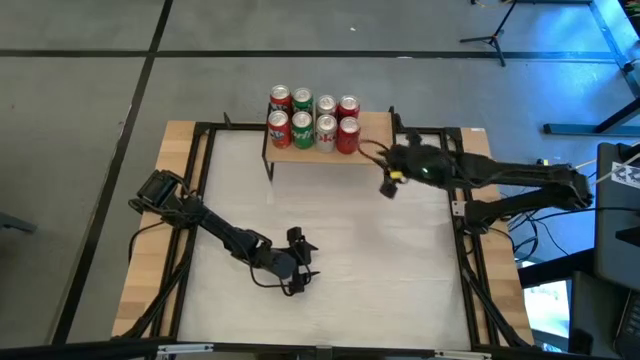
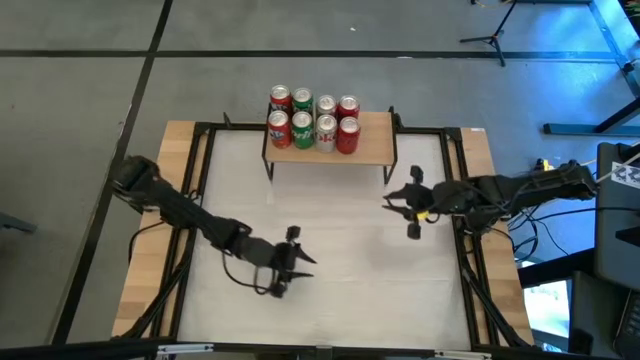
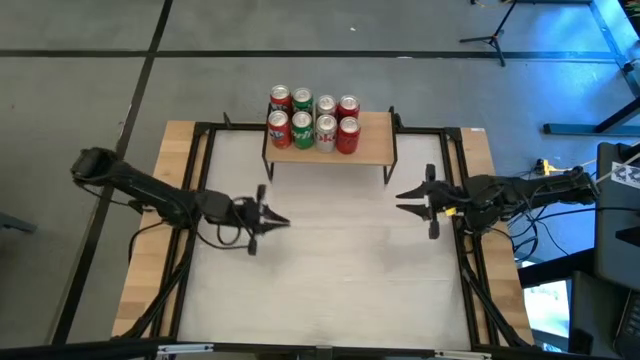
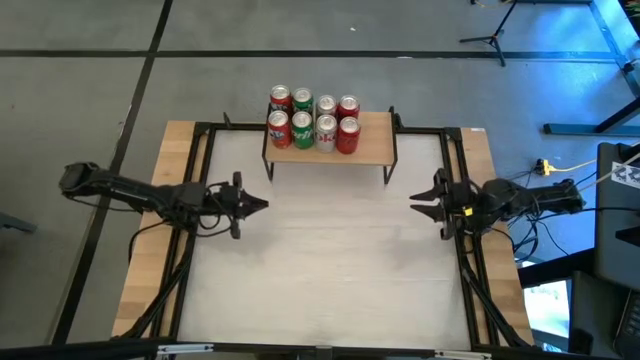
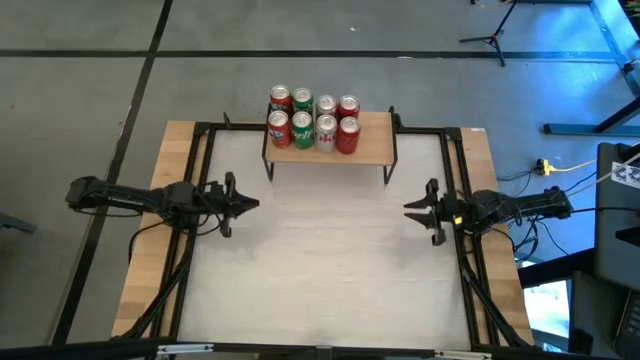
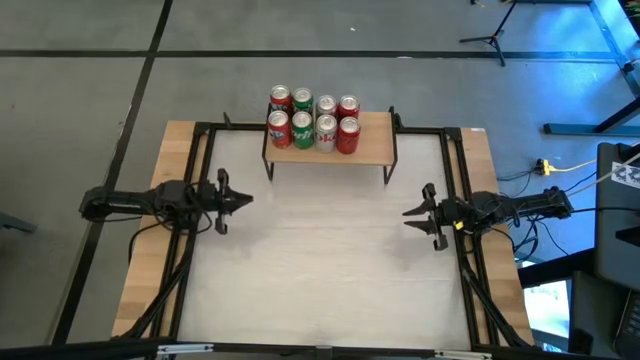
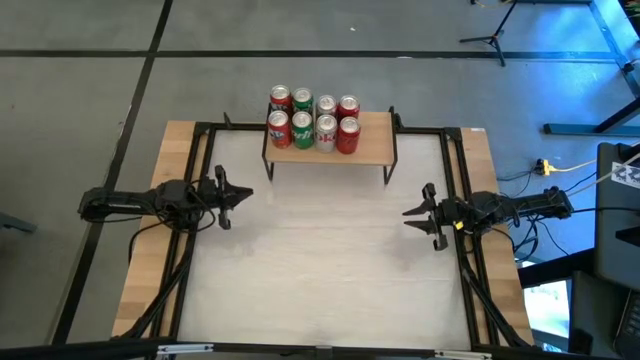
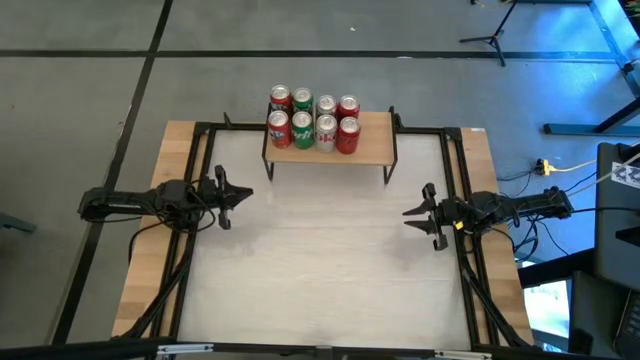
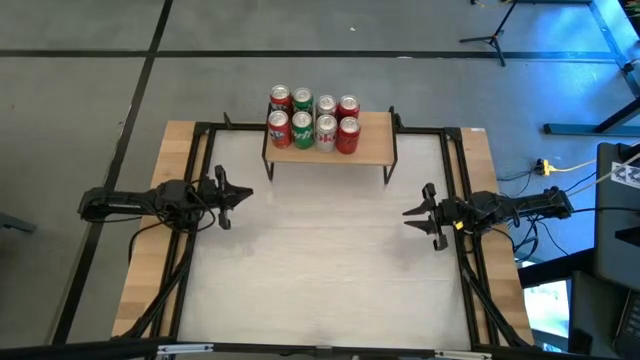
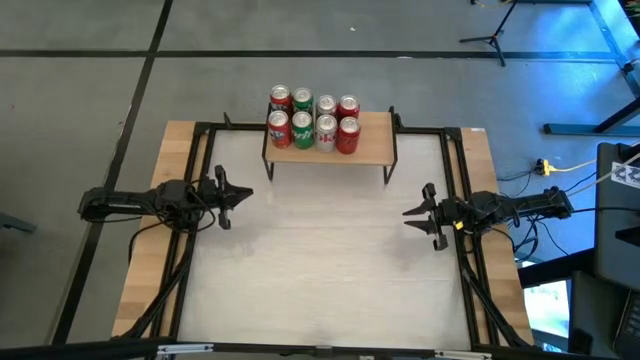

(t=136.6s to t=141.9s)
Task: Place canned beverage on shelf
Return to Home Position

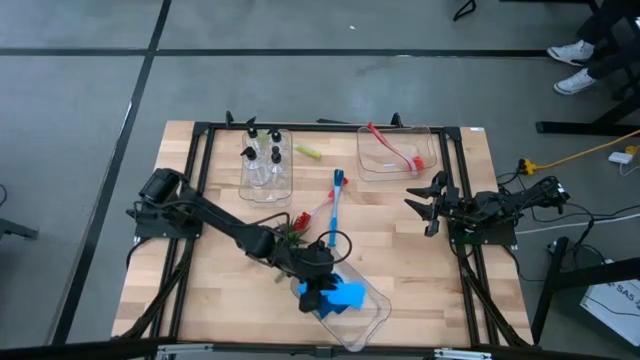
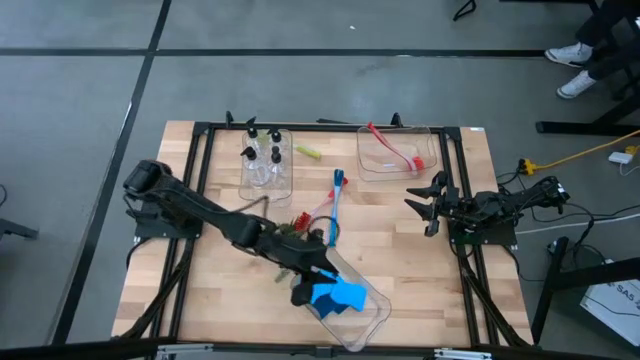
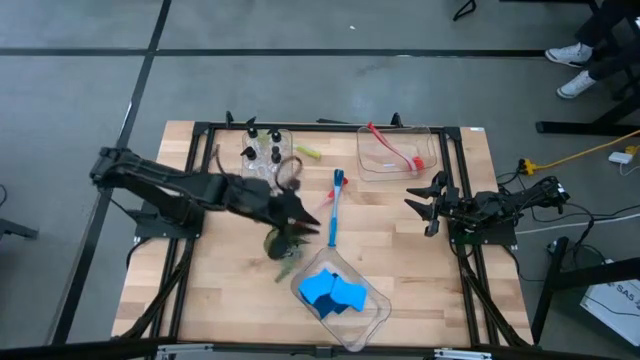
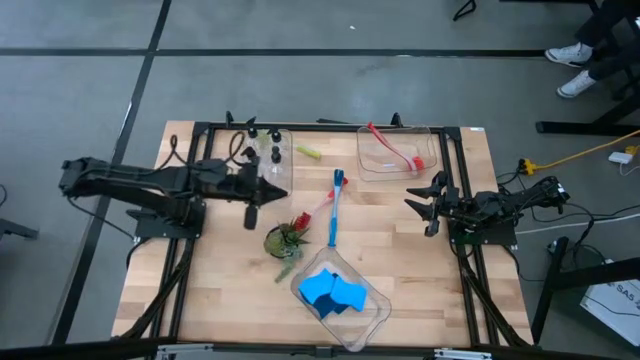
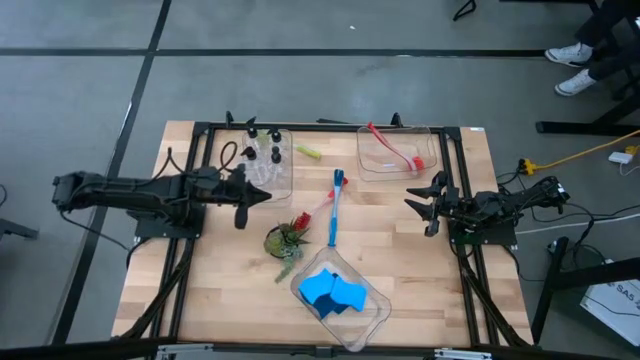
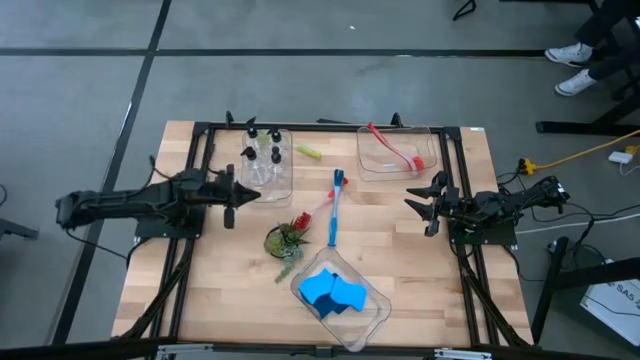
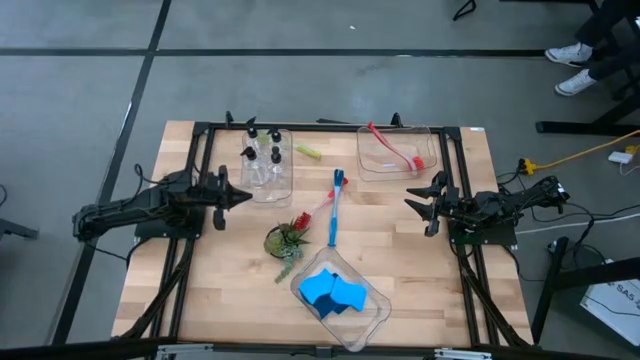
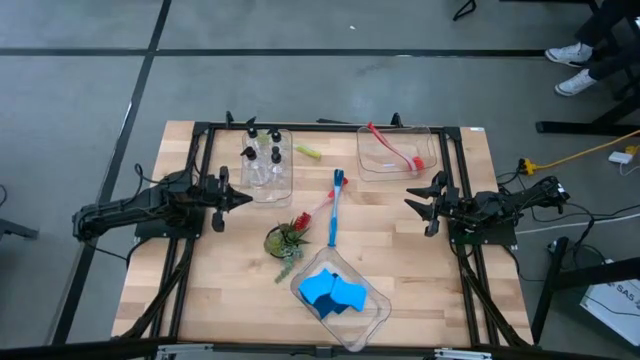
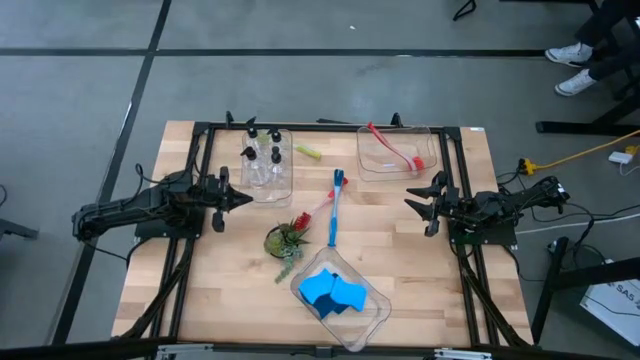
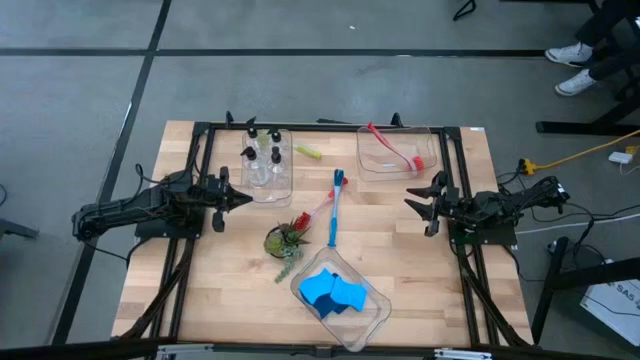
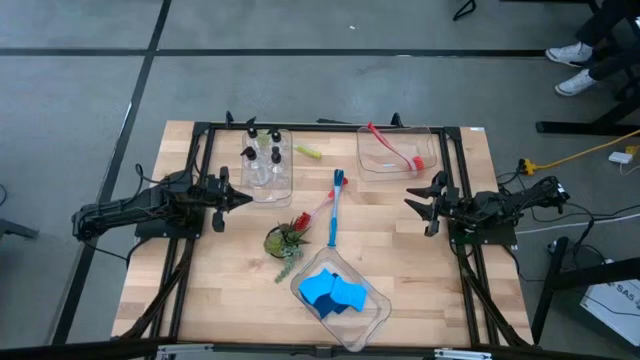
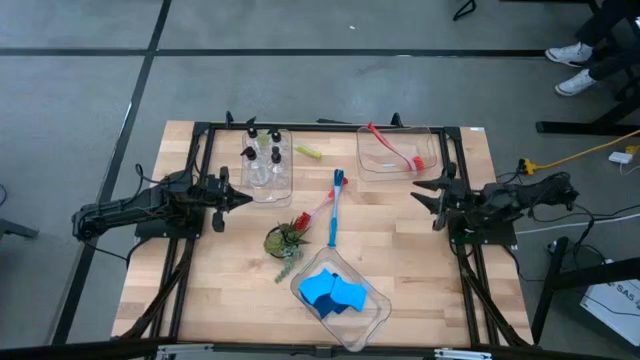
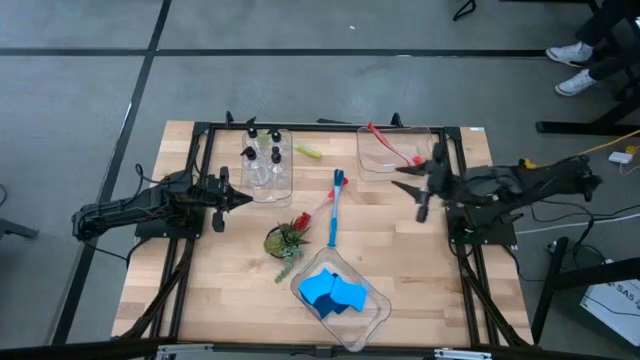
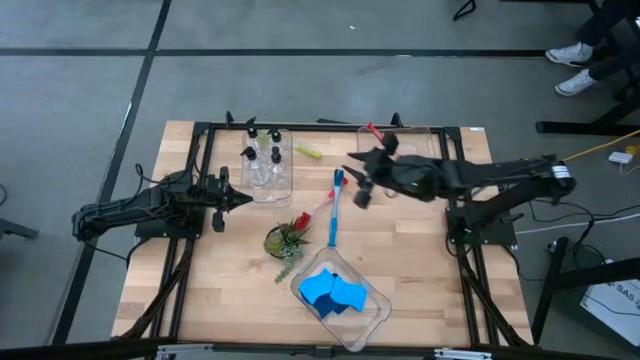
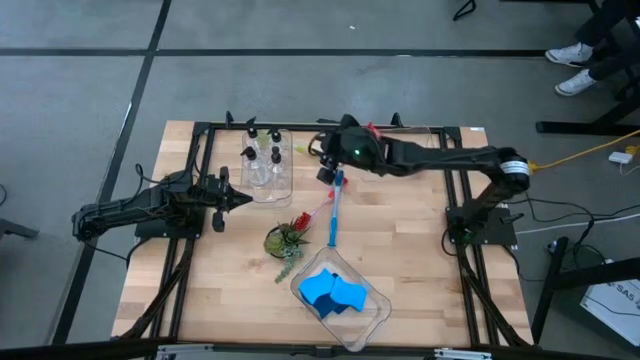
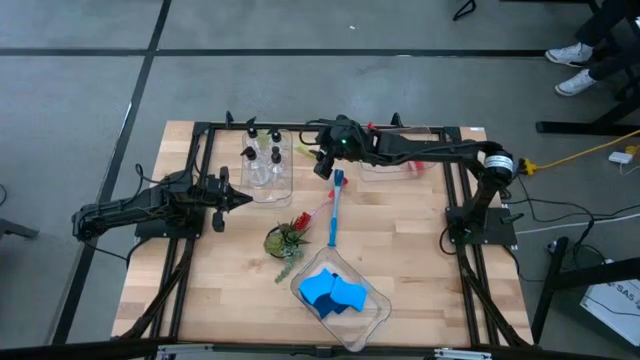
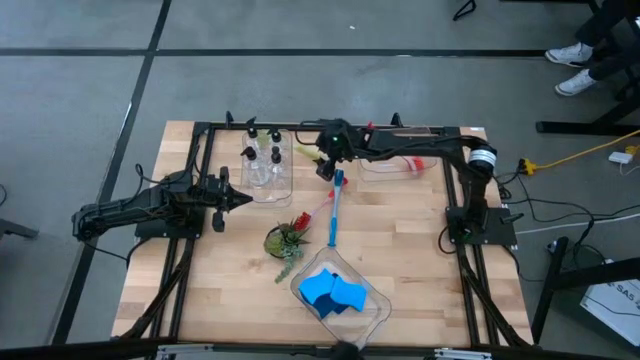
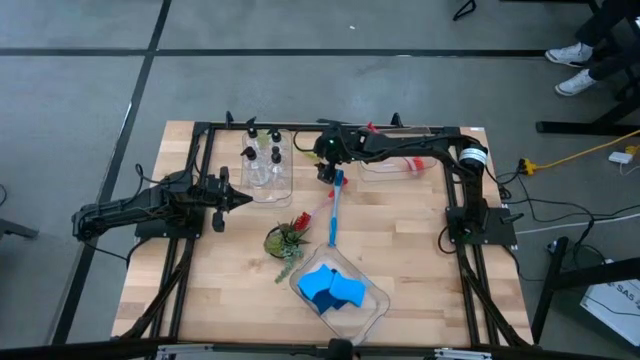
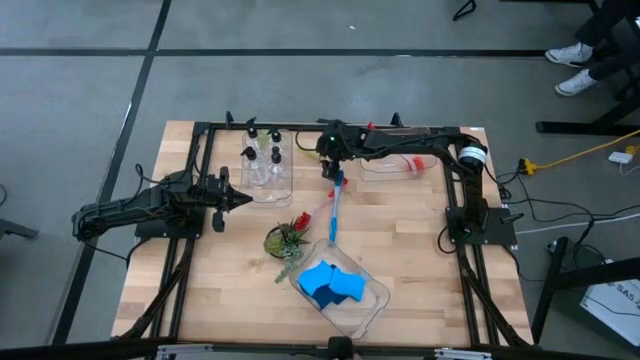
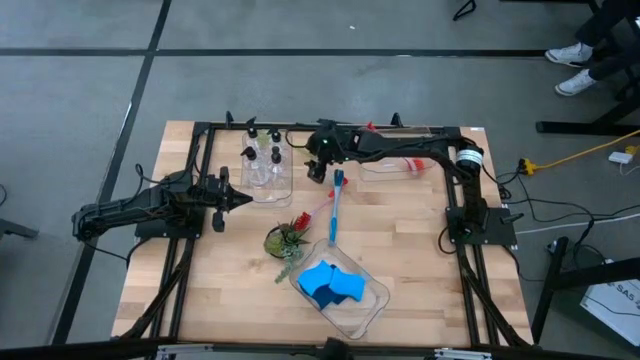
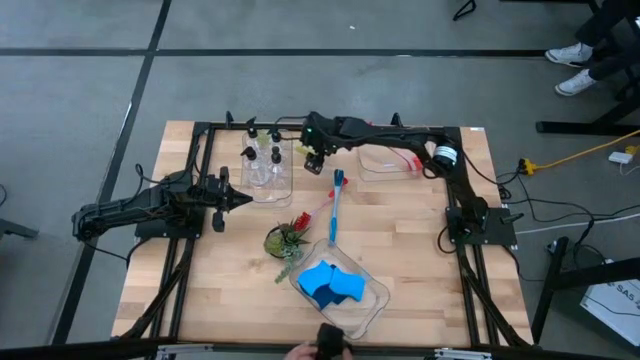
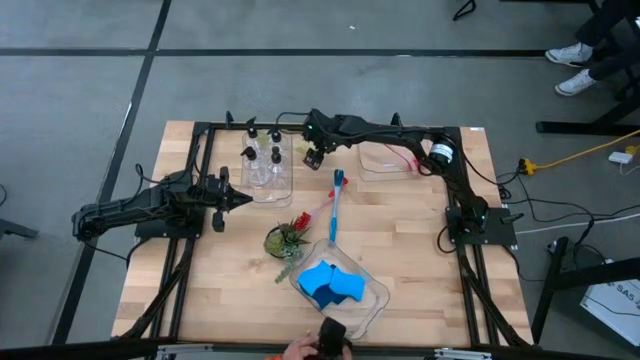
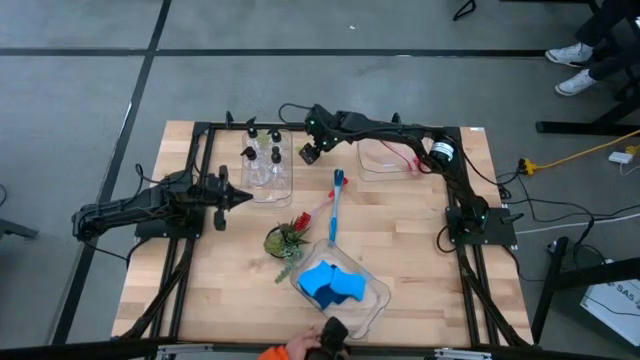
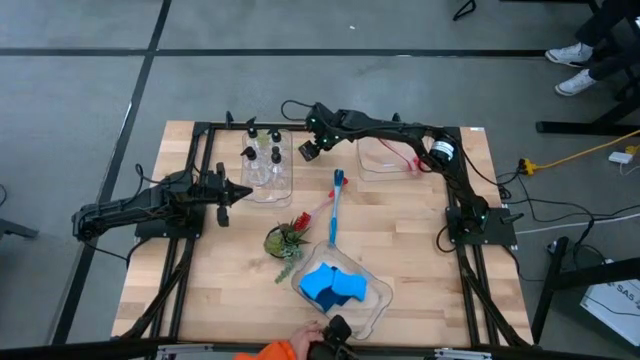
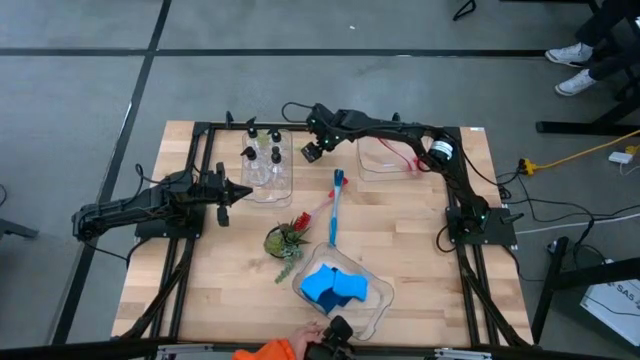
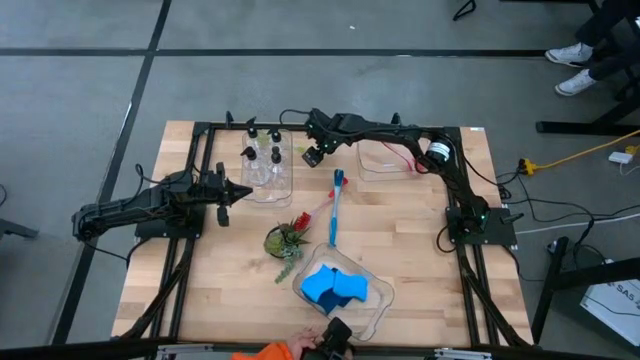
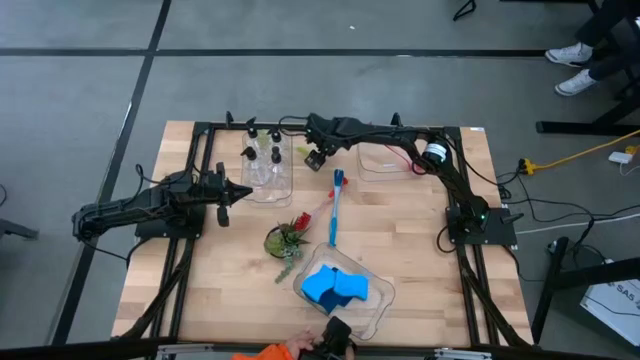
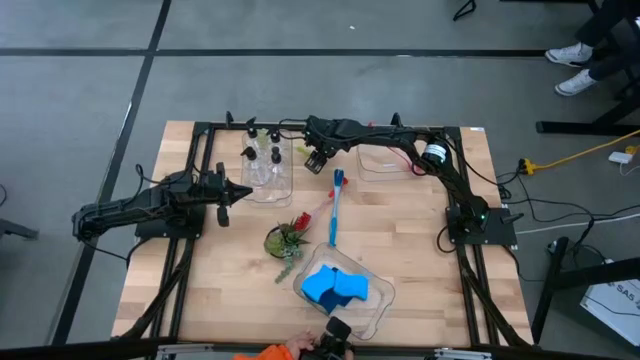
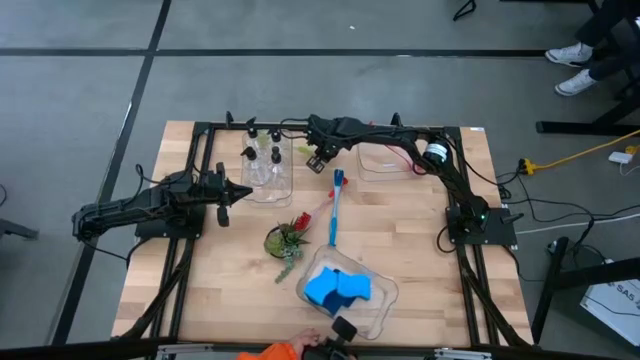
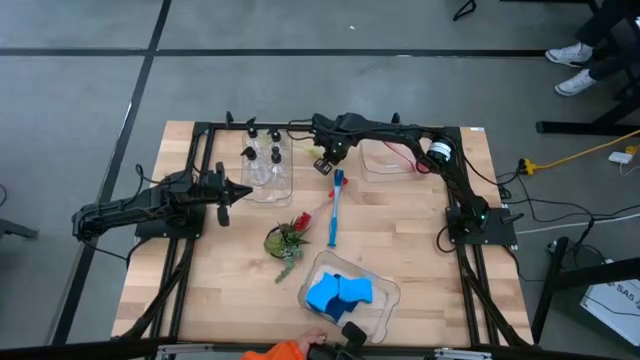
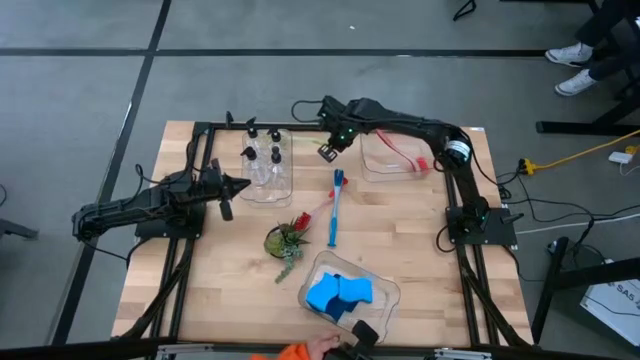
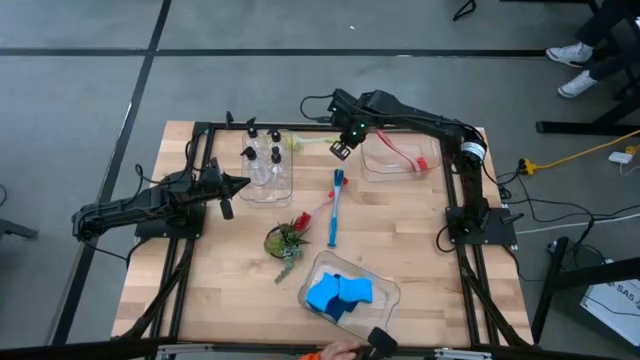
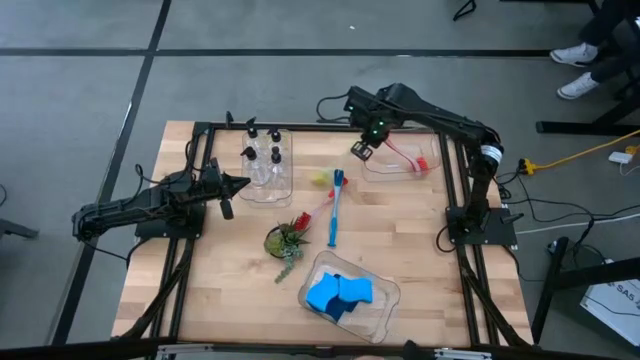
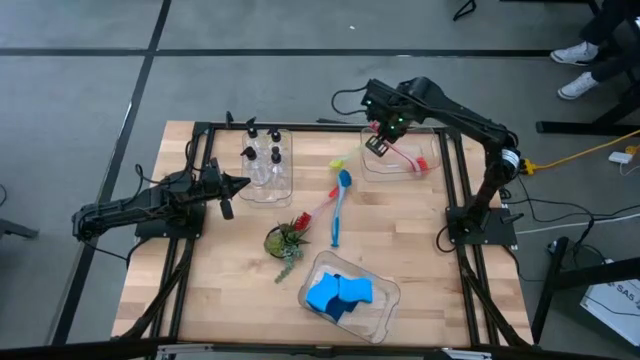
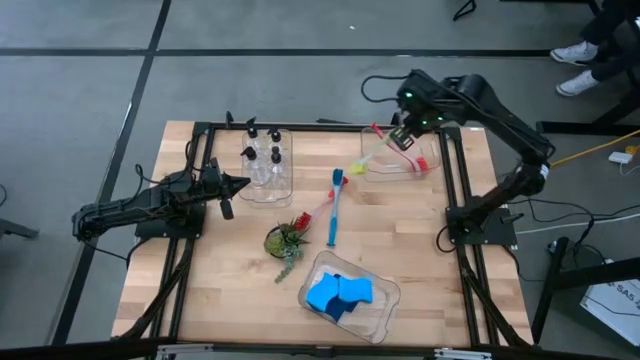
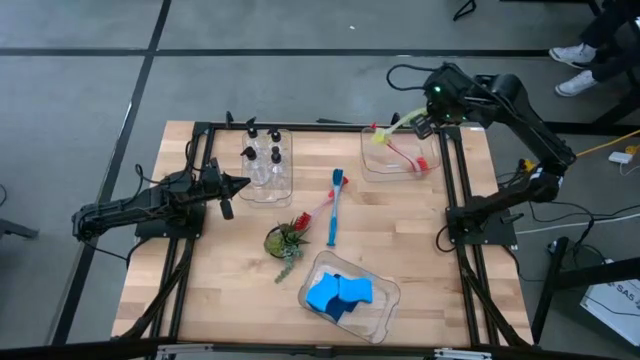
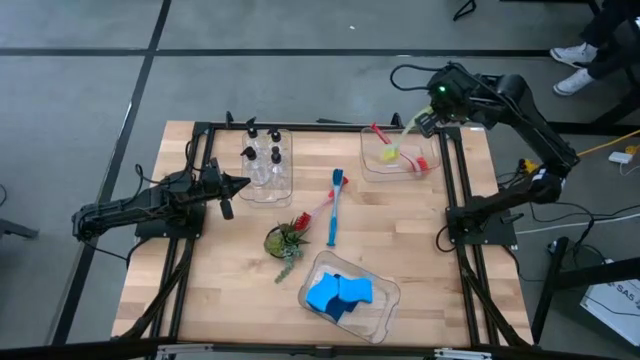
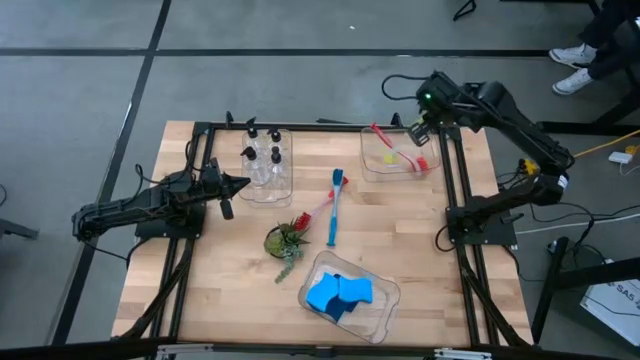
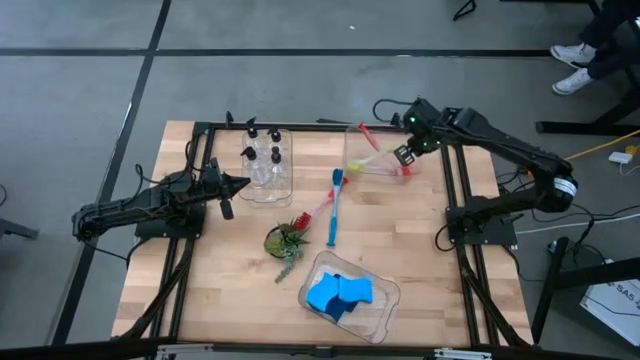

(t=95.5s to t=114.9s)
Task: Pick & Place Kitchen Sink Supplies
Put the yellow dish brush into the top right transparent bin
